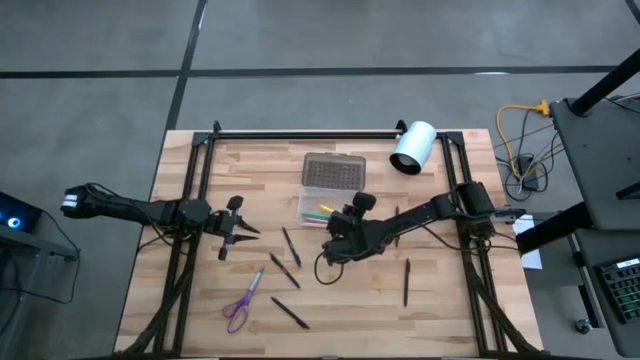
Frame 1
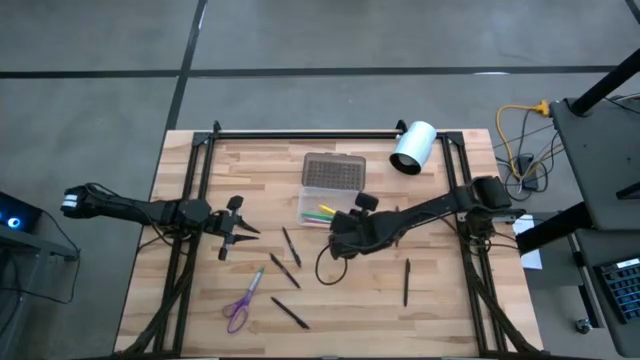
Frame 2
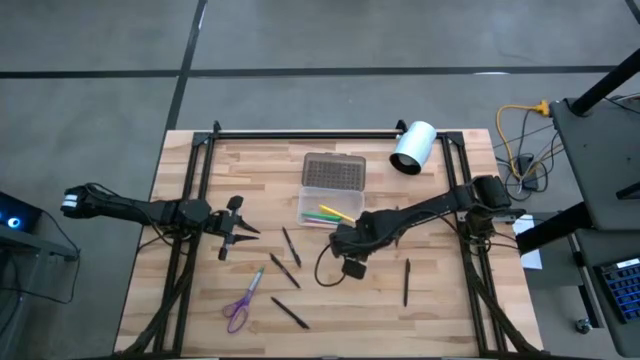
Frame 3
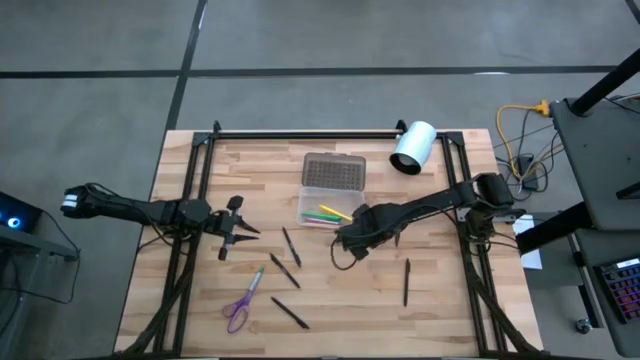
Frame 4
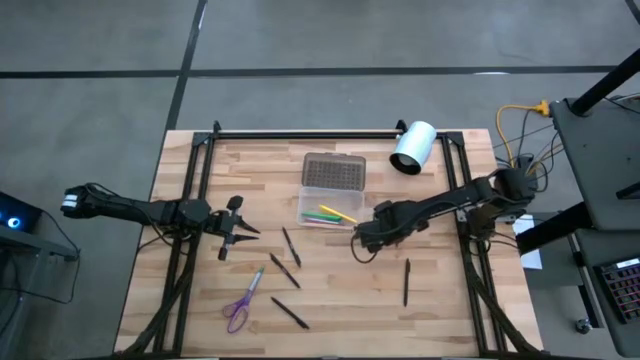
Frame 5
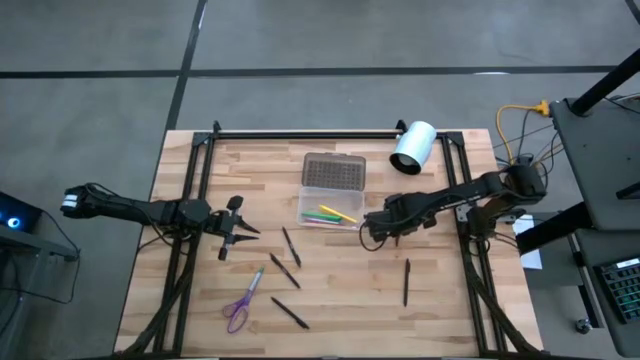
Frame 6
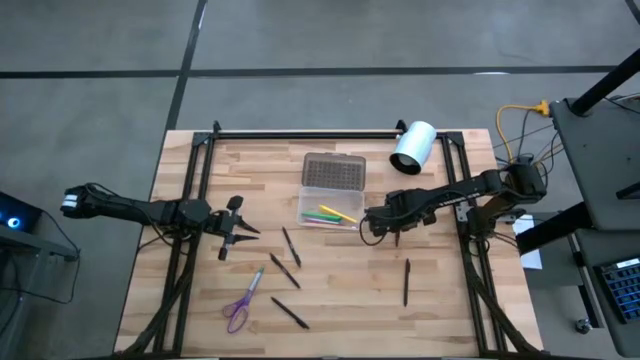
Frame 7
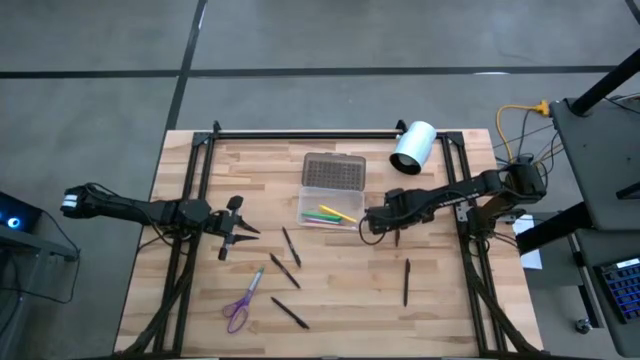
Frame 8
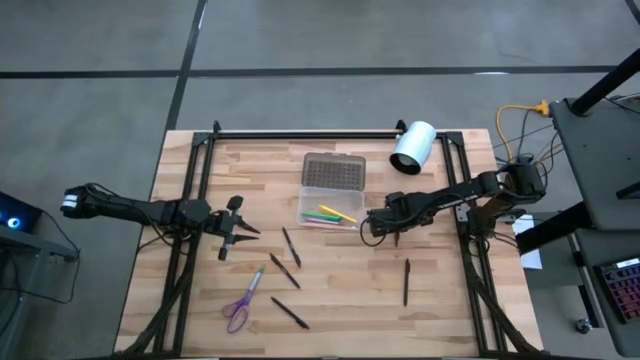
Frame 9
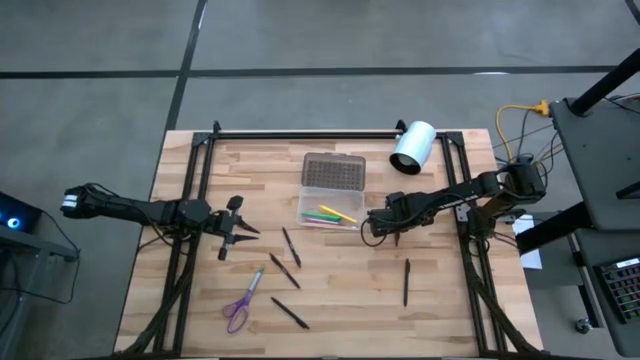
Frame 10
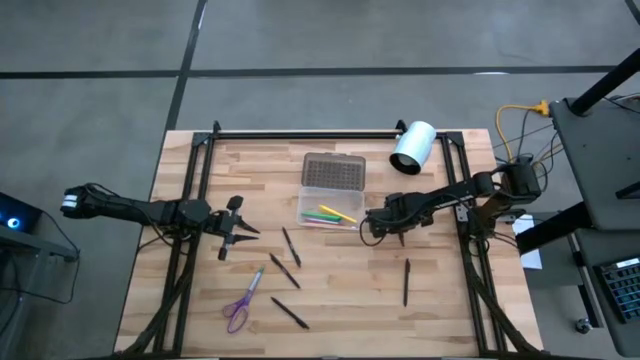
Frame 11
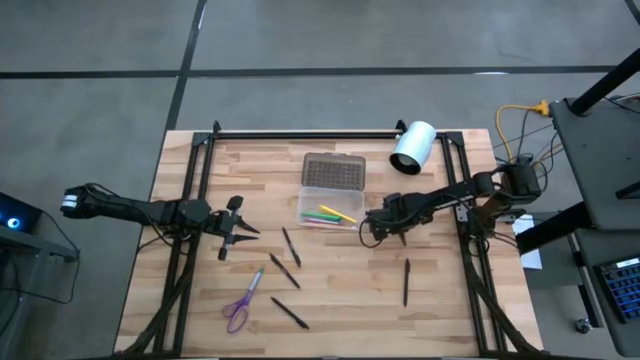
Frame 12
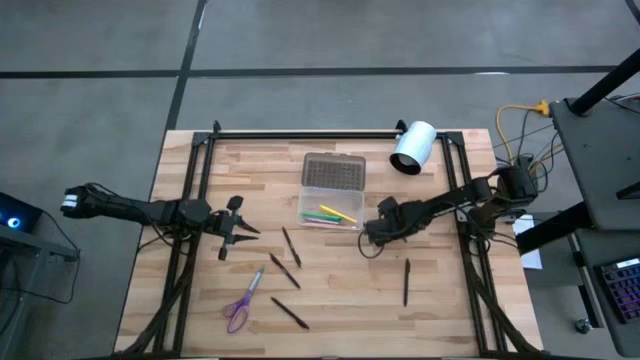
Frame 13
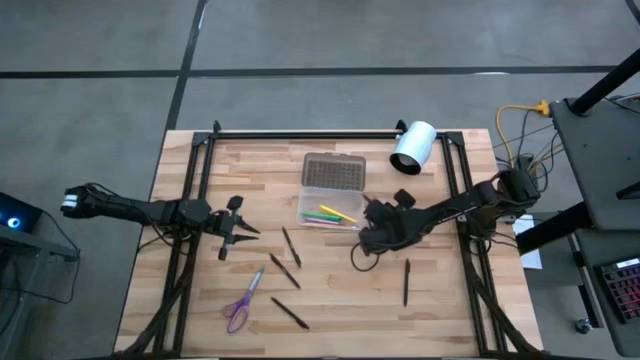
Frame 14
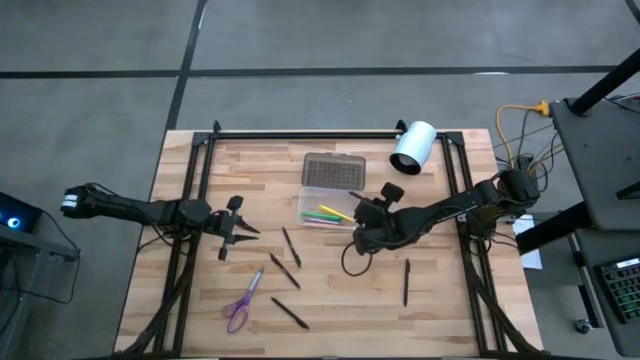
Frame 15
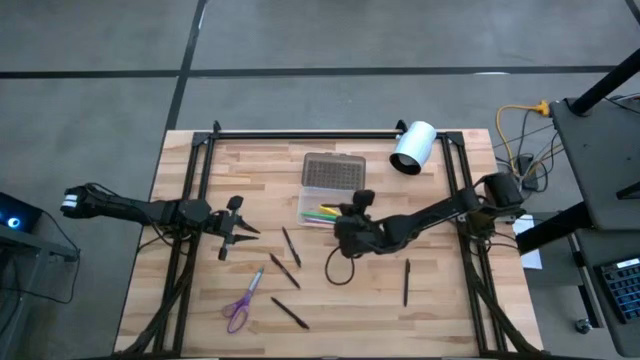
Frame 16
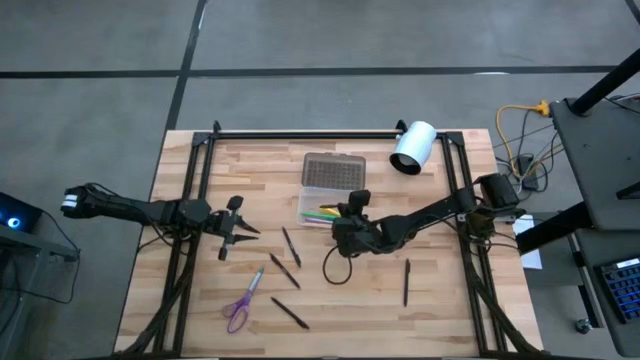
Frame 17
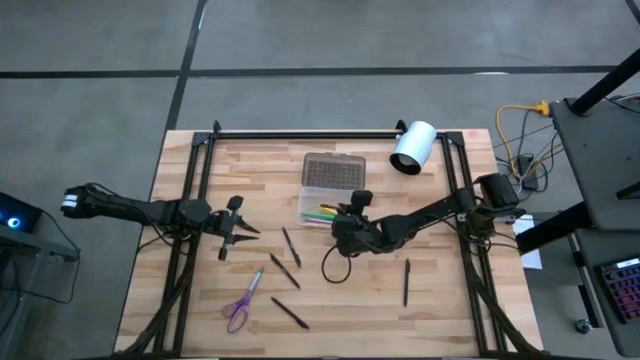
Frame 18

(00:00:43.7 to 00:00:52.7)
Task: Pick & place school supplies into a supply box
Put the brown pen into the black supply box

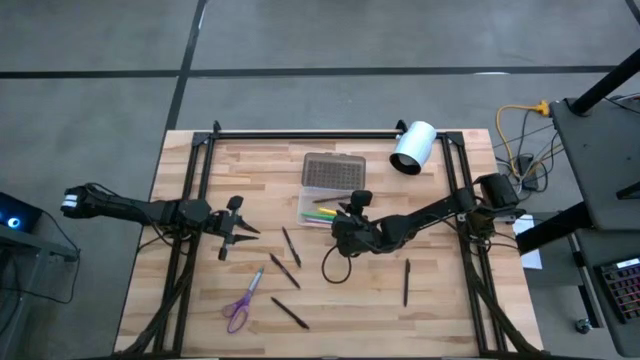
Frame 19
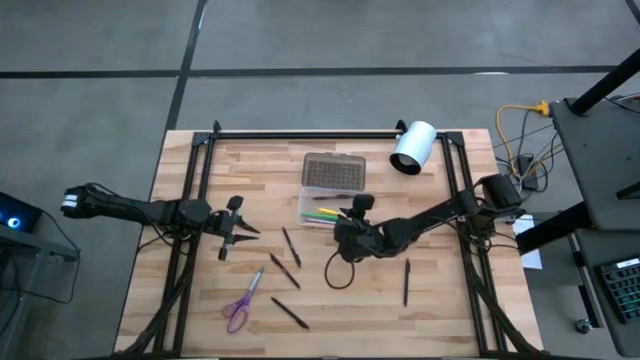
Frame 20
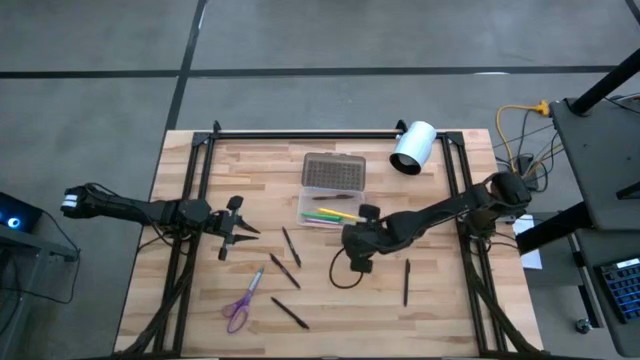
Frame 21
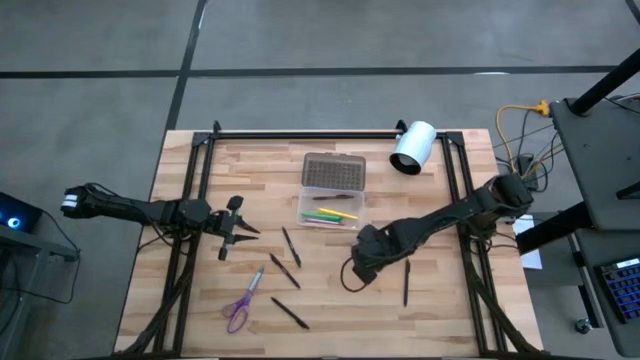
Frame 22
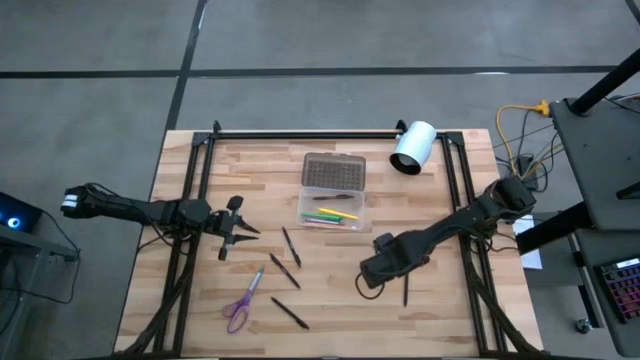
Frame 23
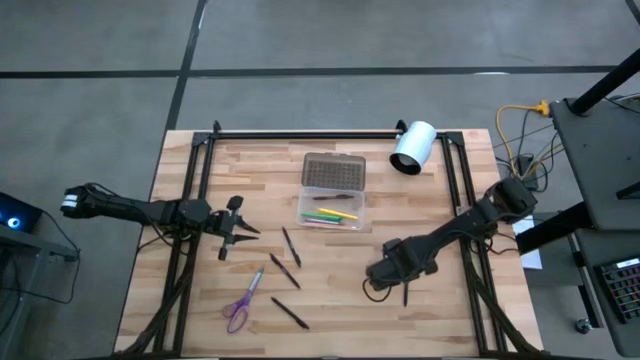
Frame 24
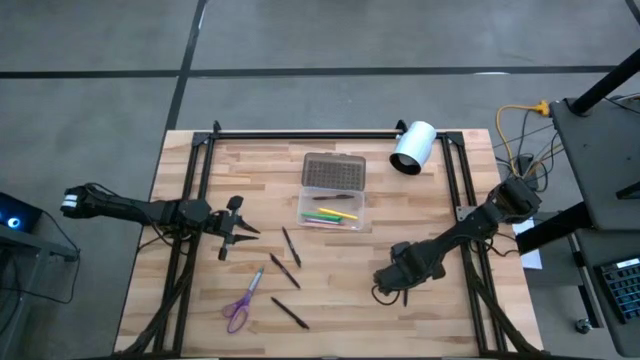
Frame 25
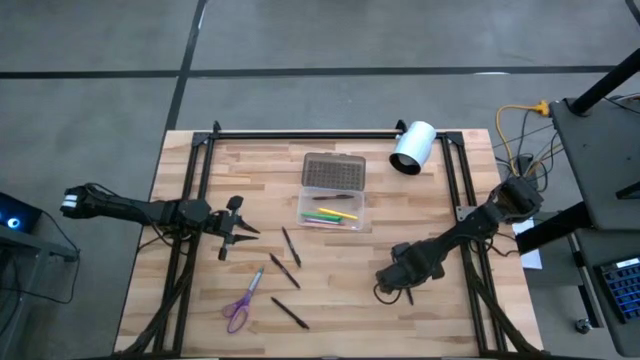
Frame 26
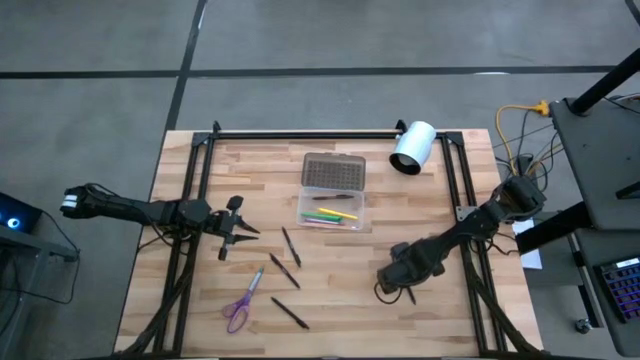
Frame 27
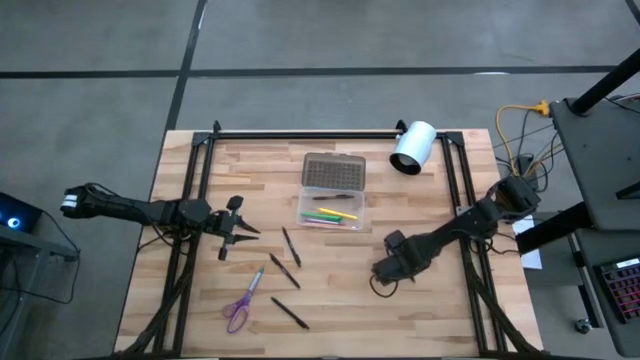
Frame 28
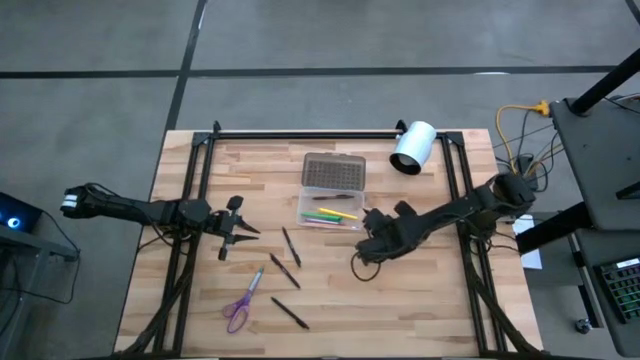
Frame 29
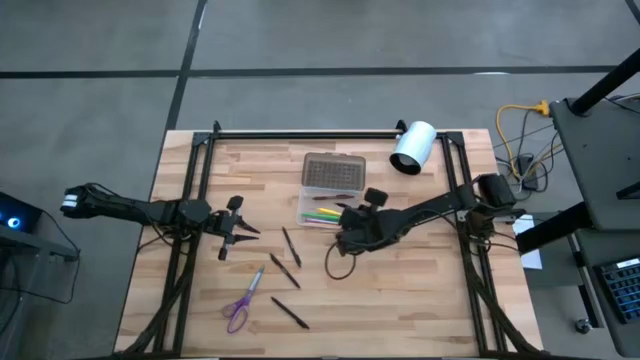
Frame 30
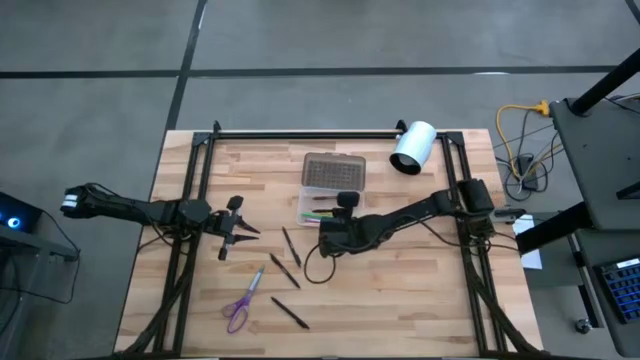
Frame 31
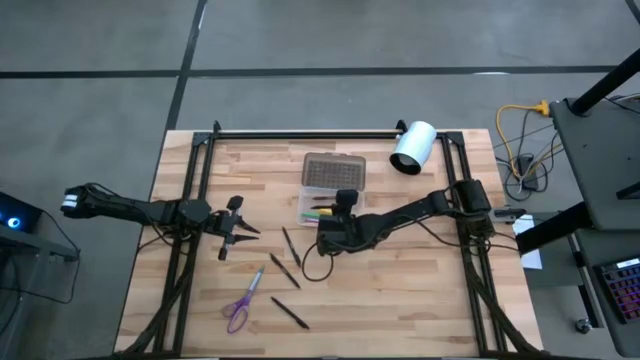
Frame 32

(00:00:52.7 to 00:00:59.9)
Put the black pen into the black supply box

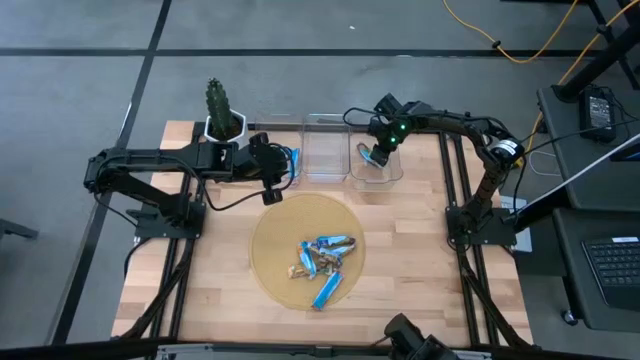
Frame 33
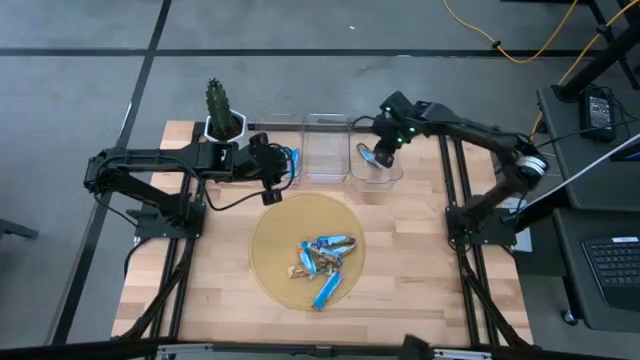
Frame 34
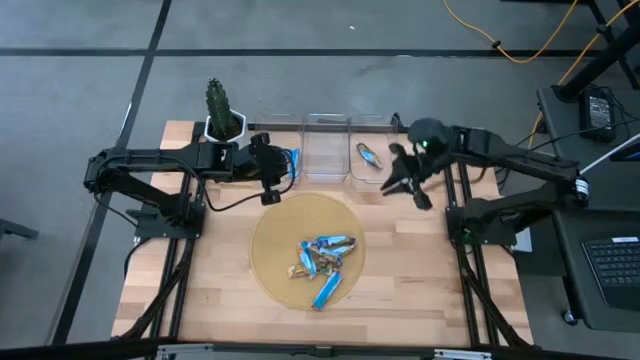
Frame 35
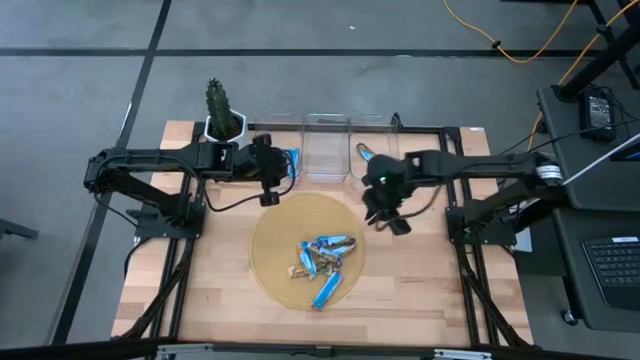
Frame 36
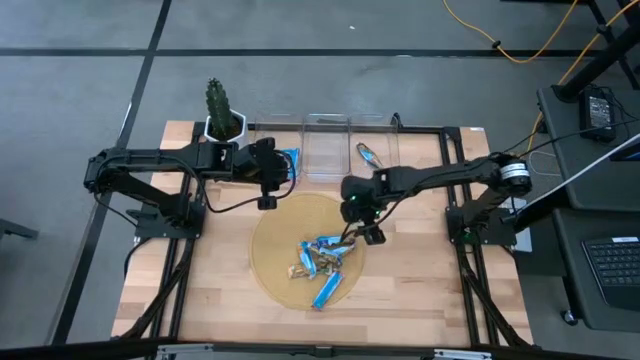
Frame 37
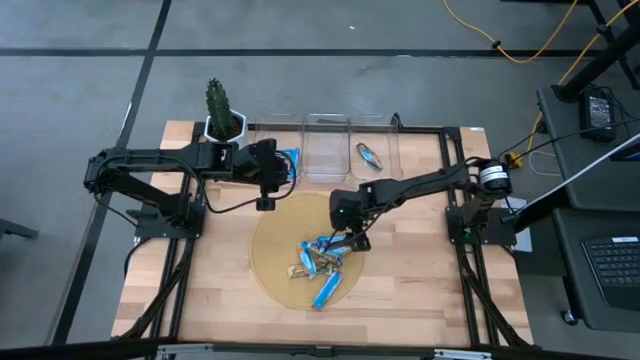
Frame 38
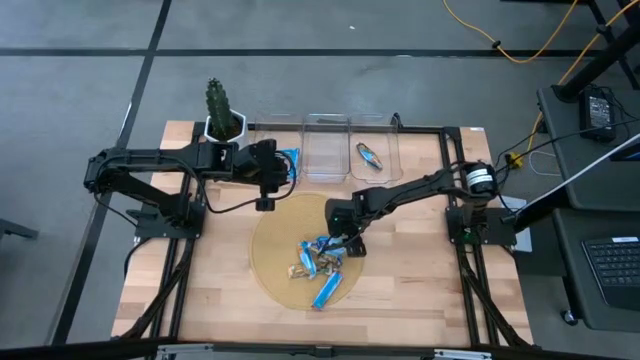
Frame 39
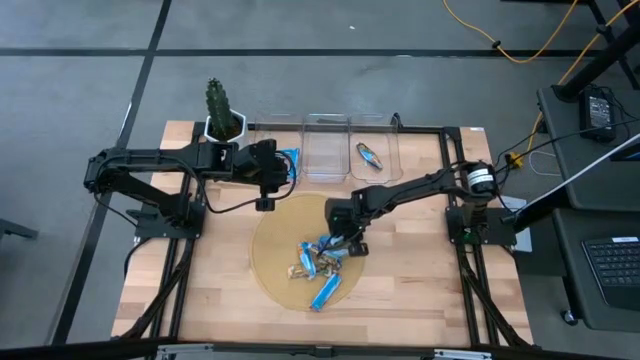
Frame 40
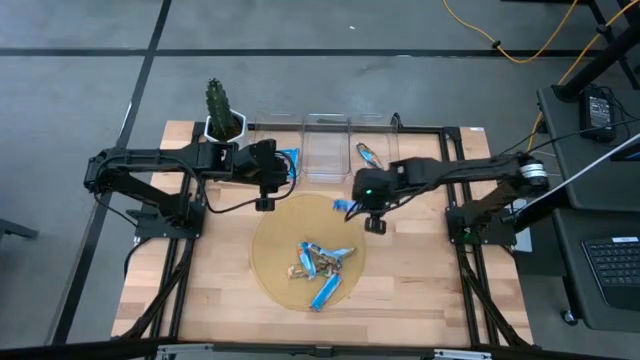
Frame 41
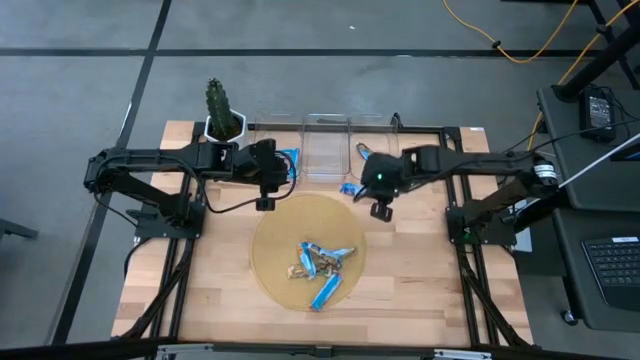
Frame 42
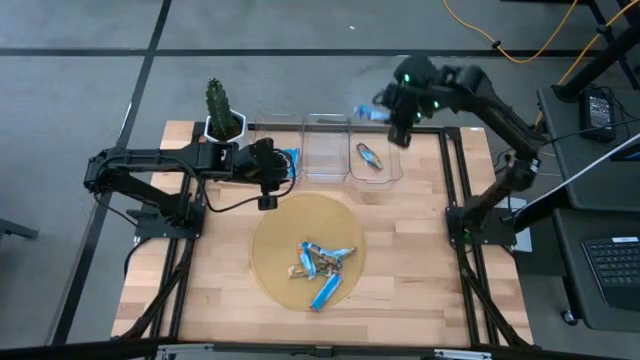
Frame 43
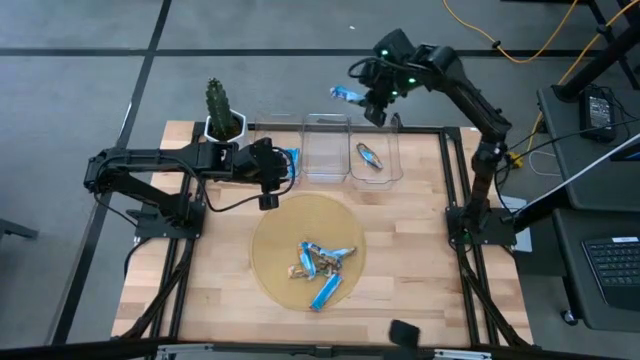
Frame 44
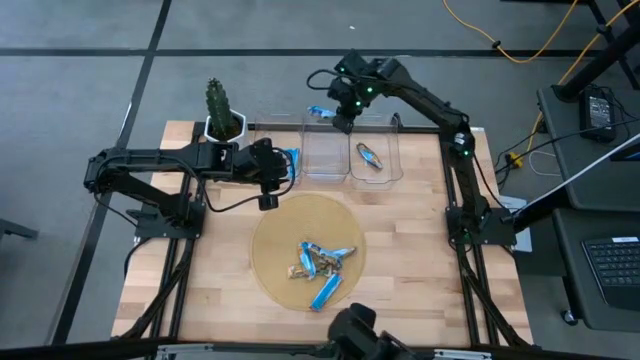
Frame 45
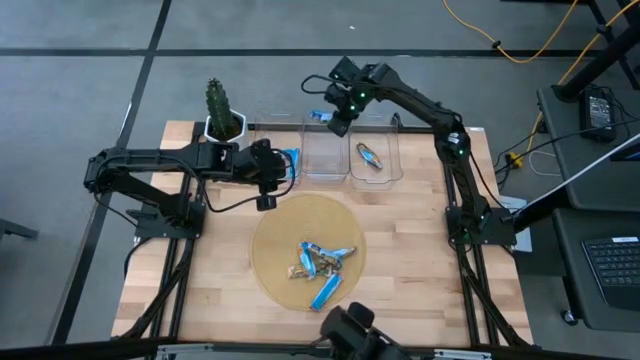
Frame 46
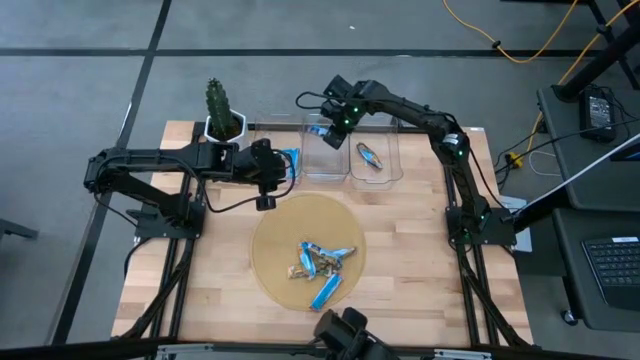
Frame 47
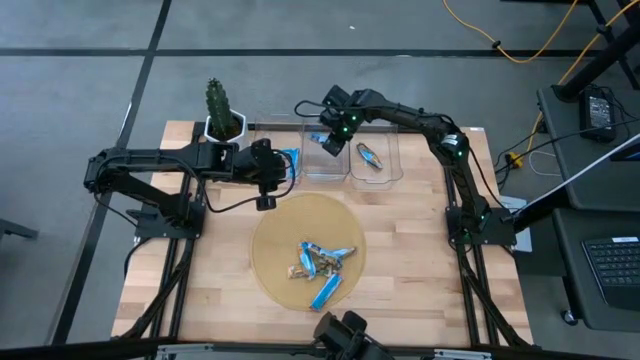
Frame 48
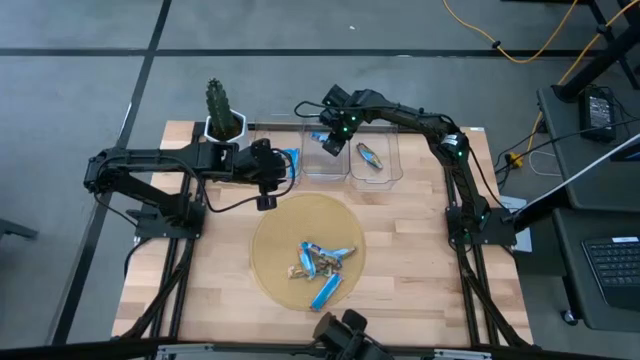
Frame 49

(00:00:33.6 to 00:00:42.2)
Task: Pick and place Granola Bars by type
Put the blue granola bar into the middle transparent bin
